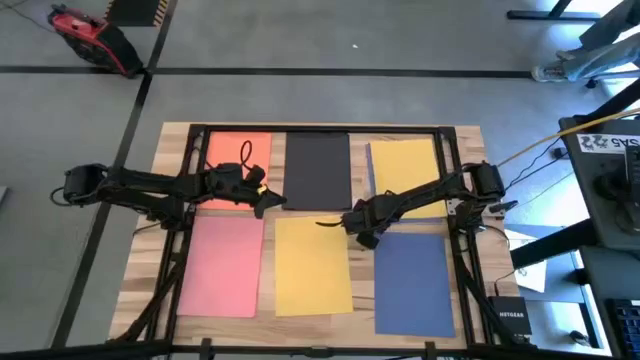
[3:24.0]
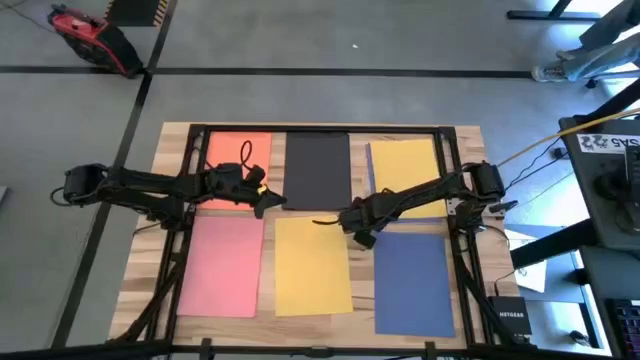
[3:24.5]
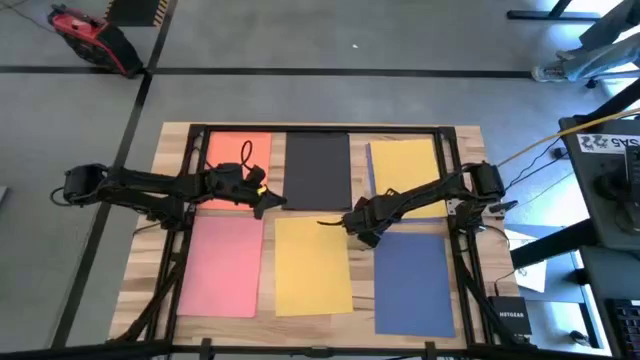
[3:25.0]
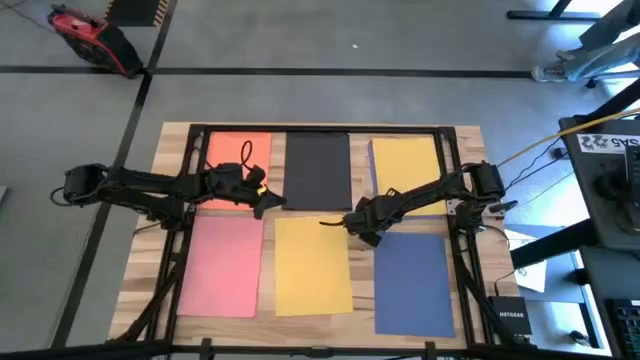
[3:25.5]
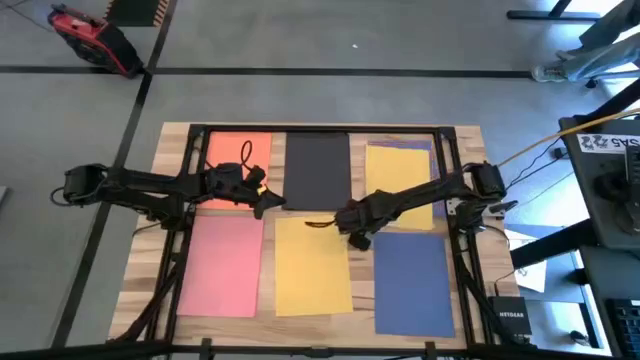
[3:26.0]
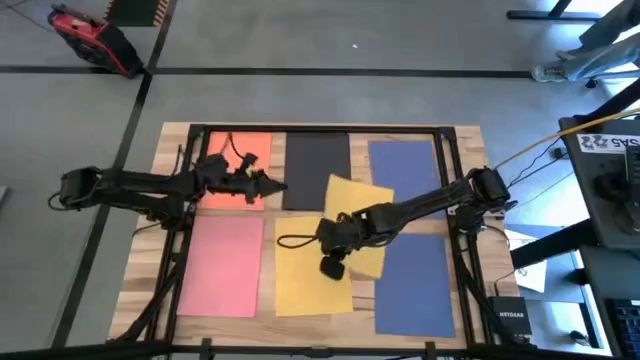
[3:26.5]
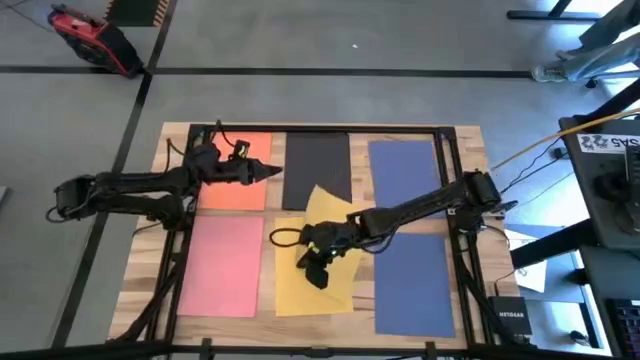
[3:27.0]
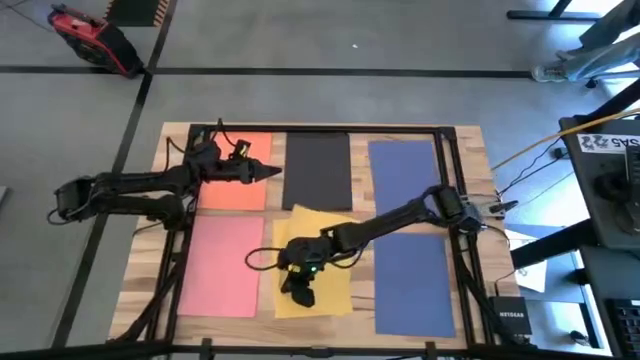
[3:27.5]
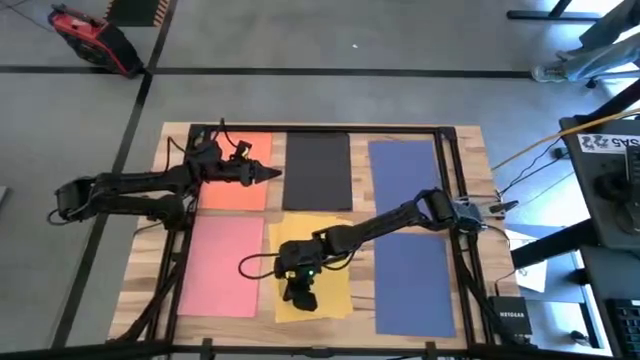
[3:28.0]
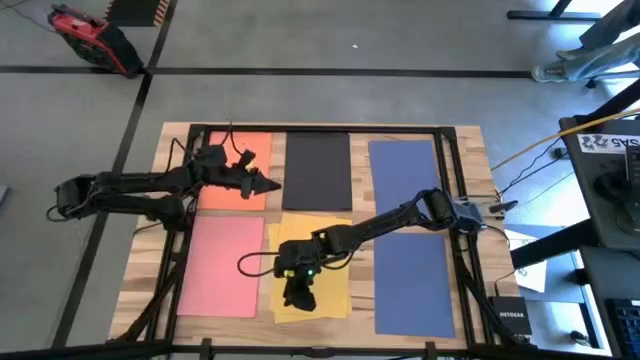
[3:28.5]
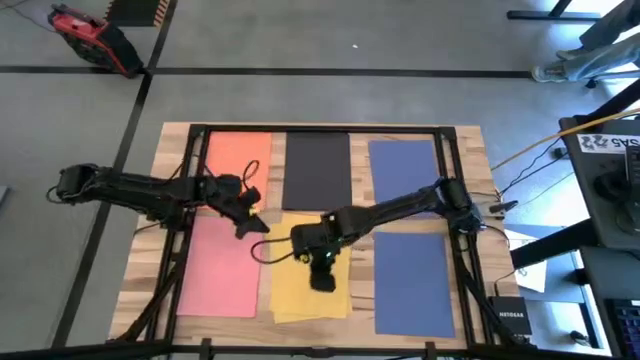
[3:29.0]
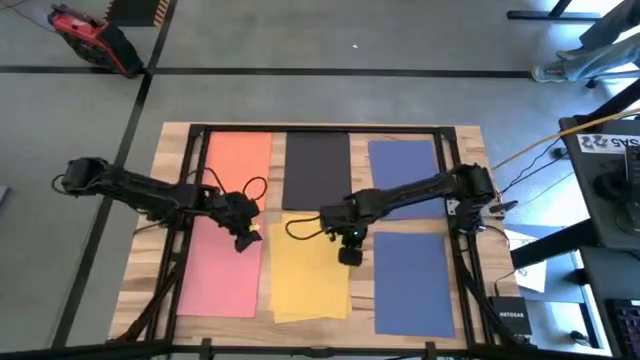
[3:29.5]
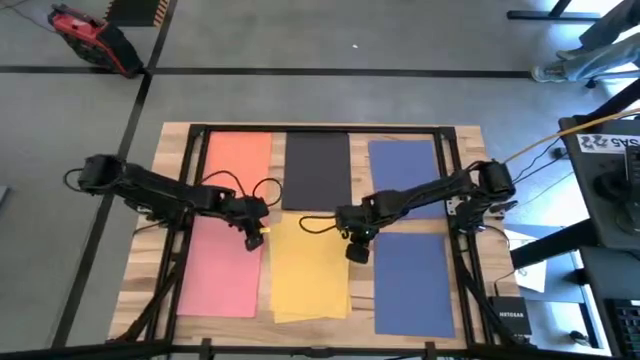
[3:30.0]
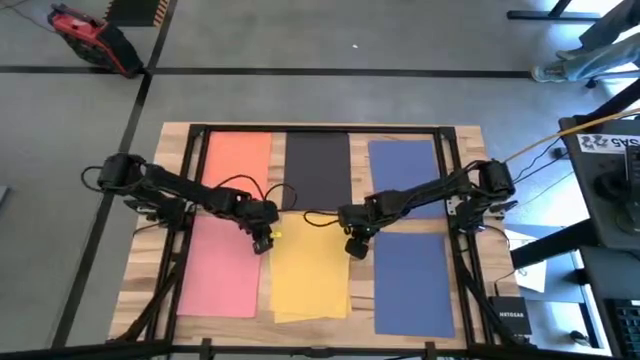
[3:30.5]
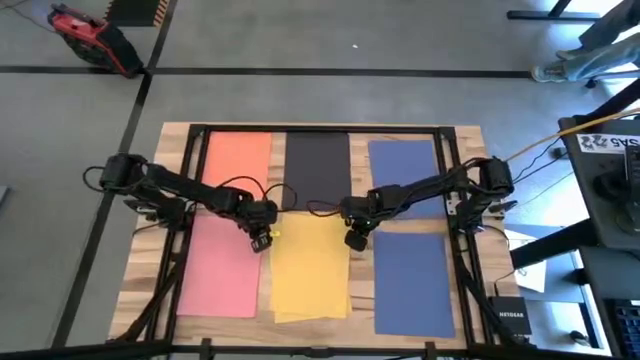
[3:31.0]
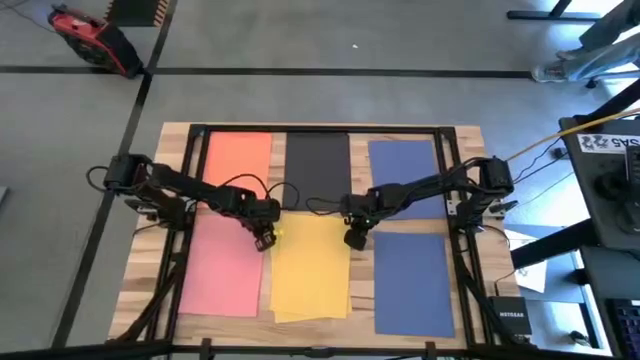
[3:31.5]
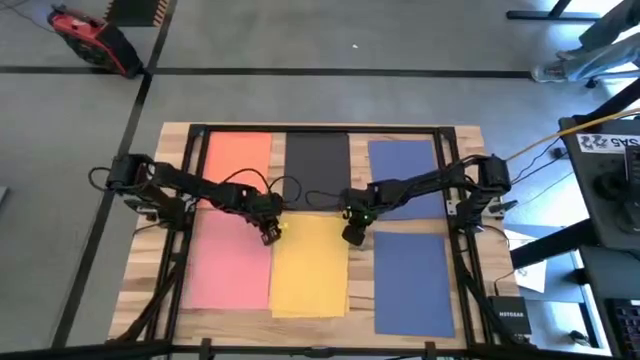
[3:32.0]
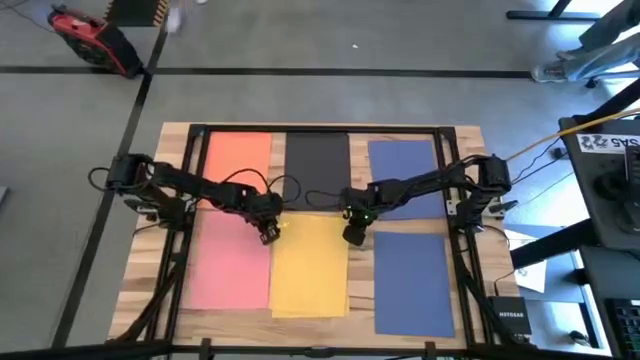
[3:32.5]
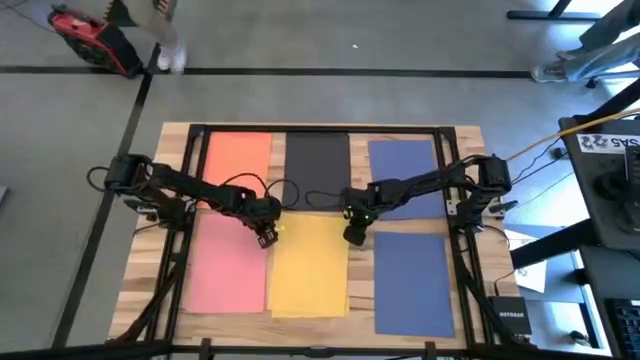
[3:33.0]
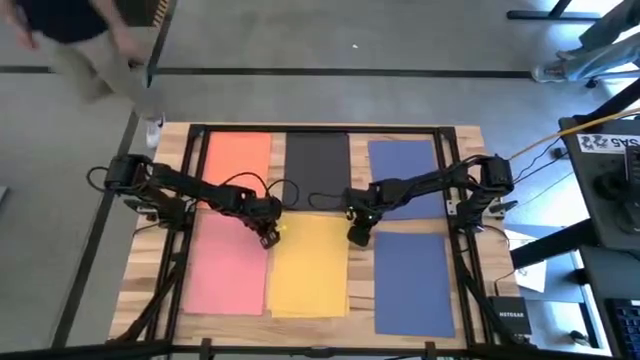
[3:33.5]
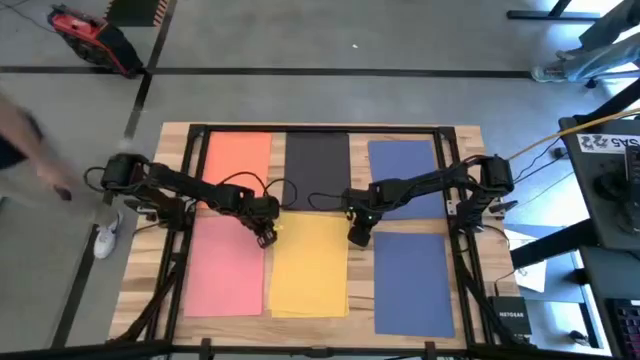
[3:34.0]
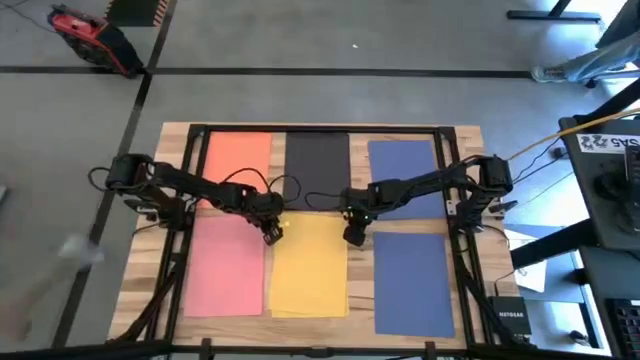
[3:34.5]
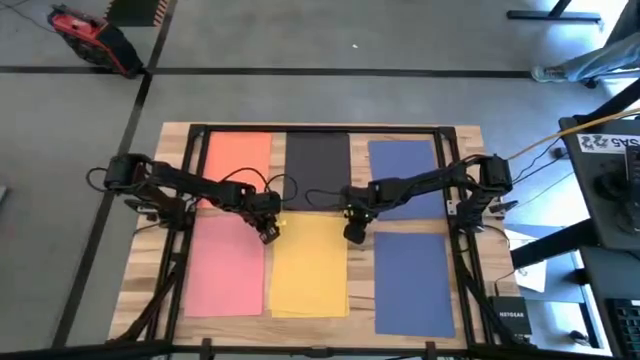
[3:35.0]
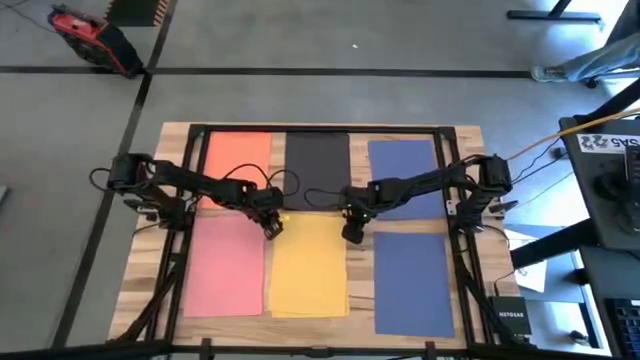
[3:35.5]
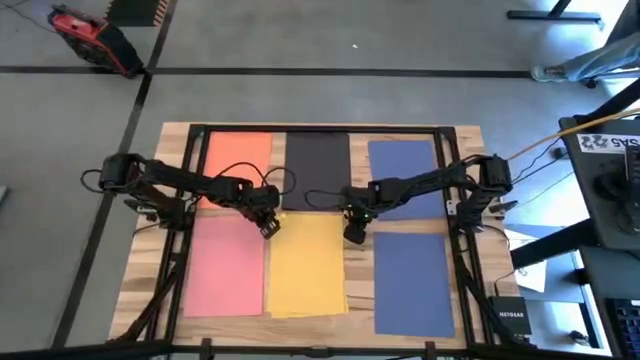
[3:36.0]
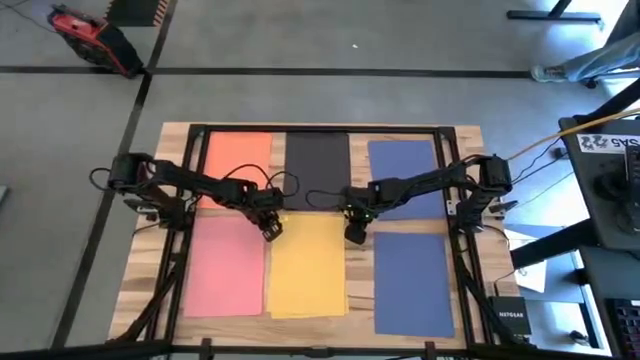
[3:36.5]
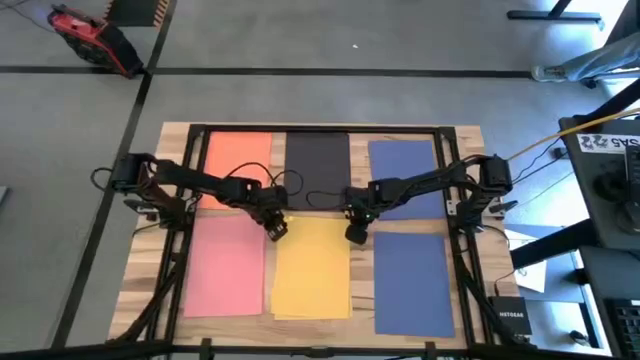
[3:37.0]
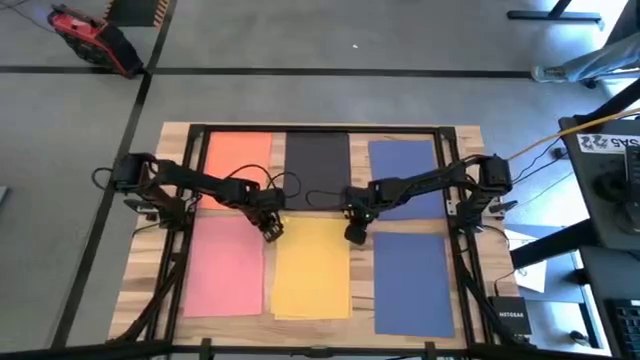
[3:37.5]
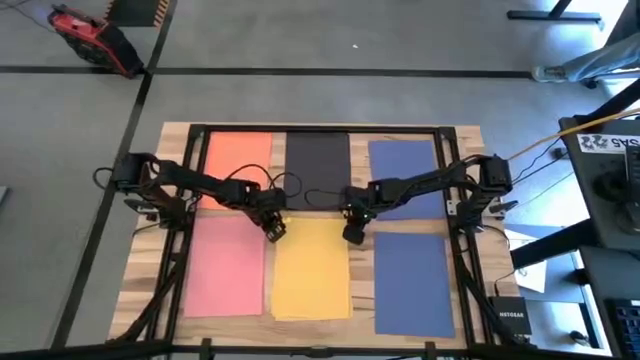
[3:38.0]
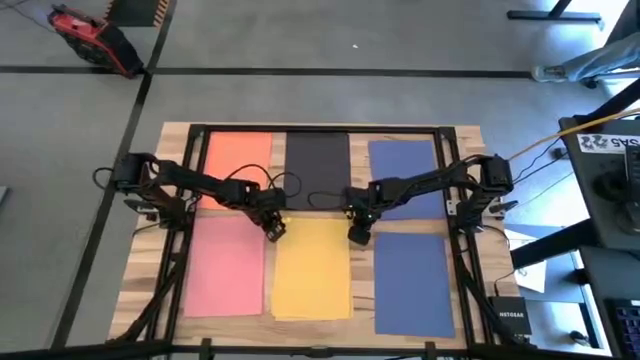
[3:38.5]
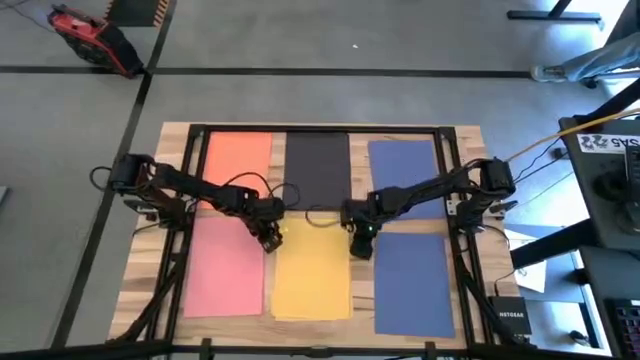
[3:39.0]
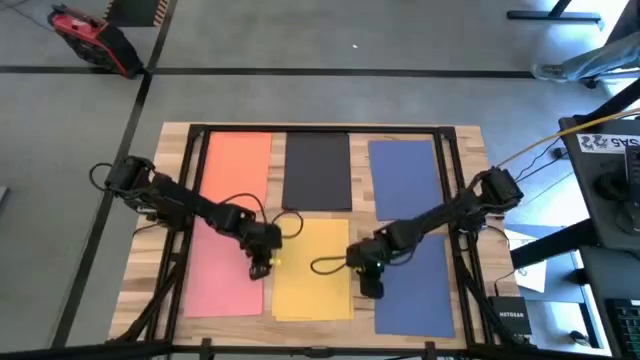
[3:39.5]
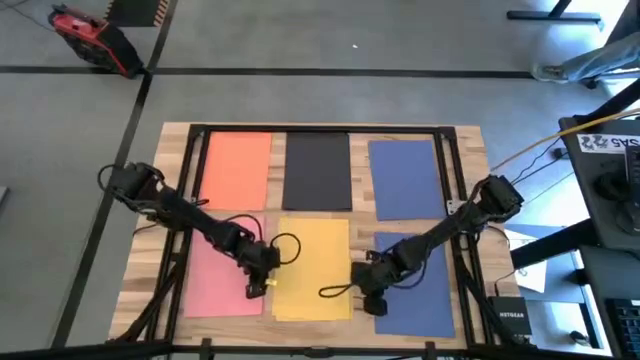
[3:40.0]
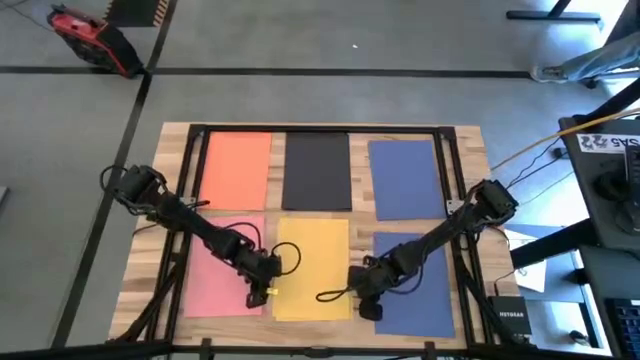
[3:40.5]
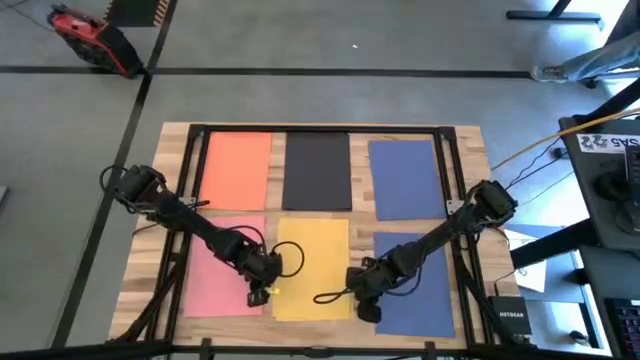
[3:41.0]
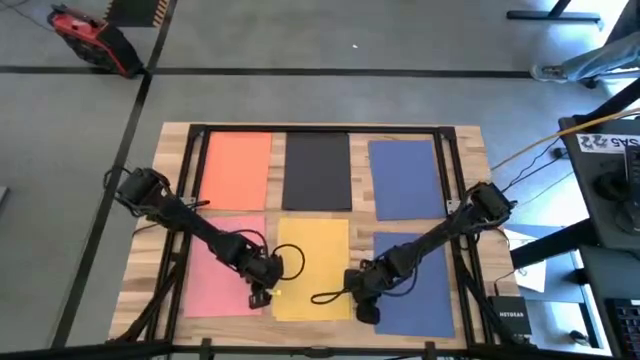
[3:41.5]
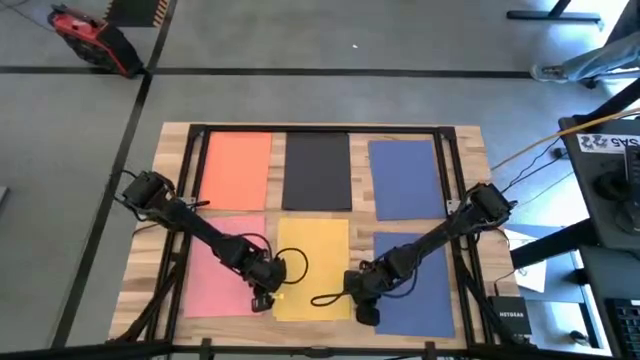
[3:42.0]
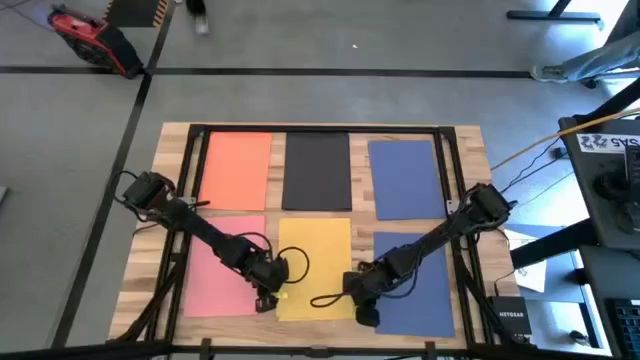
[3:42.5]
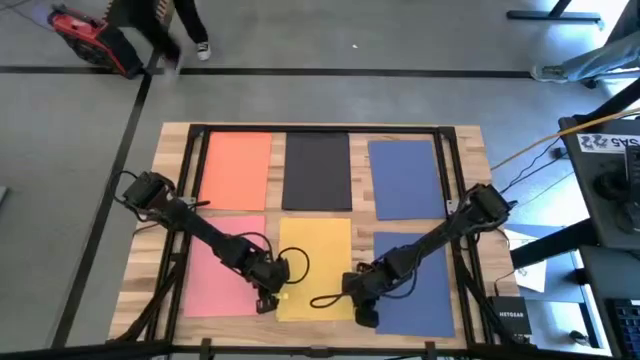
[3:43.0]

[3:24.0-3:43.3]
Task: Organize paper
Stack the yellow color paper on top of the other yellow color paper

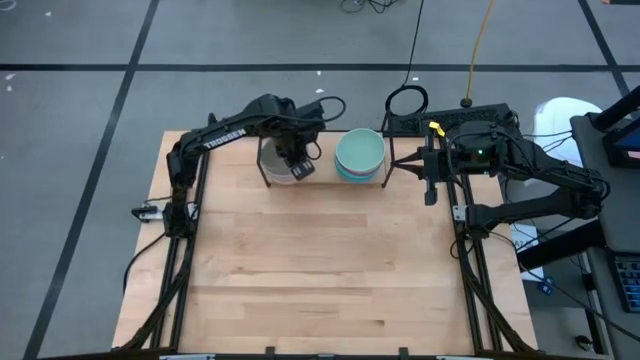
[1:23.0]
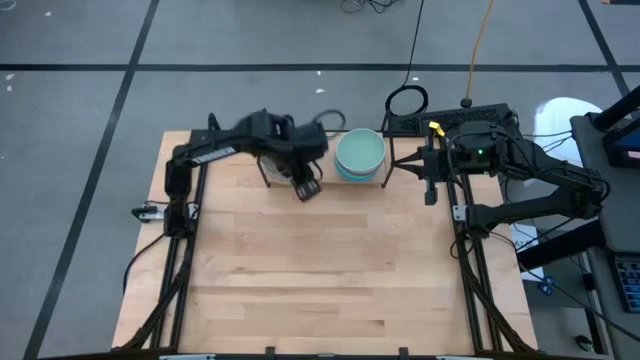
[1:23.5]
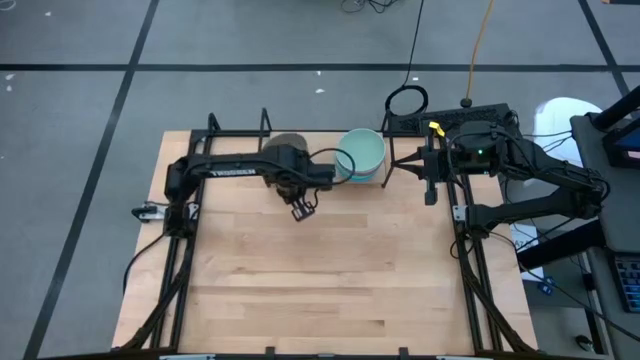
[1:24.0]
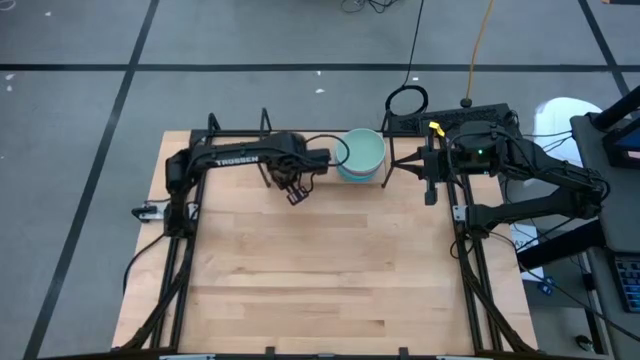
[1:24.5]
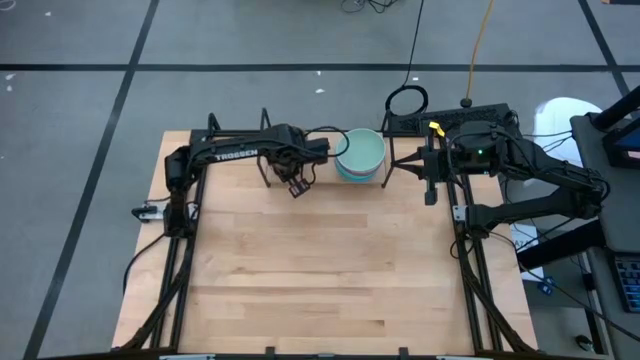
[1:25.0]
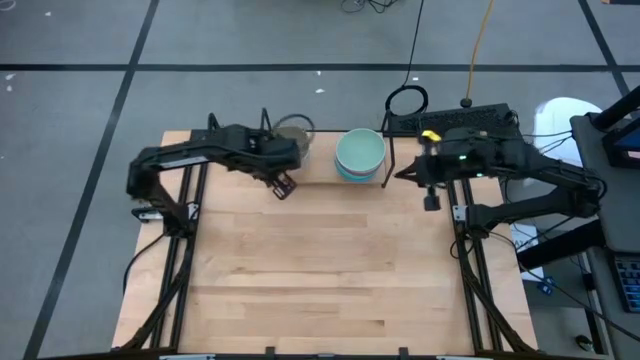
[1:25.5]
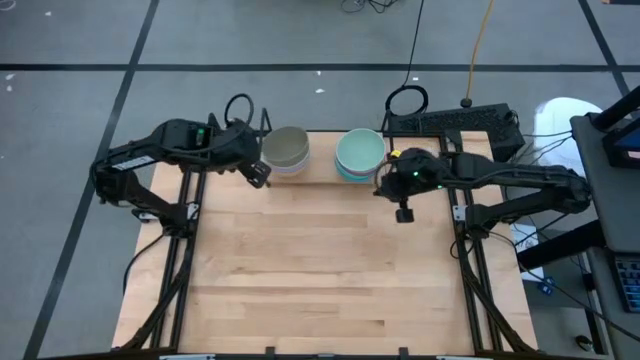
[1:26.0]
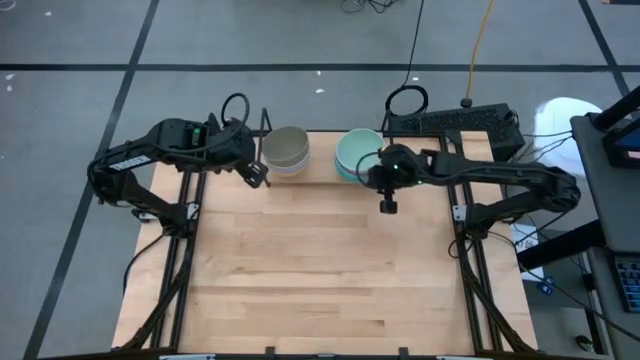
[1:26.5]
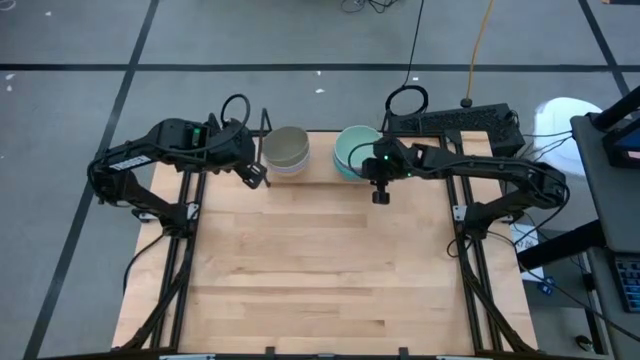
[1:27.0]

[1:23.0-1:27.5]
Task: Place and stack bowls onto a shelf
Adjust the stacked bowls on the shelf
